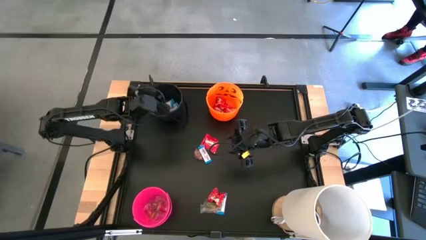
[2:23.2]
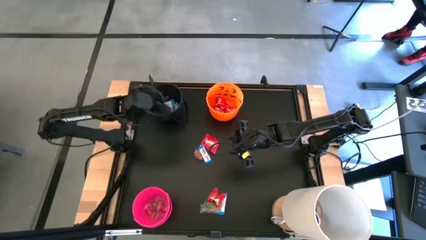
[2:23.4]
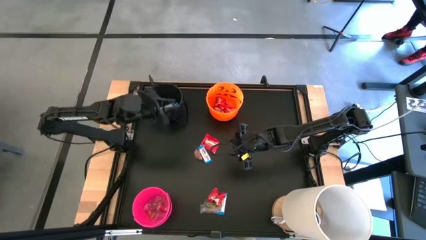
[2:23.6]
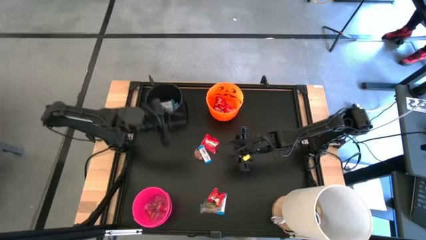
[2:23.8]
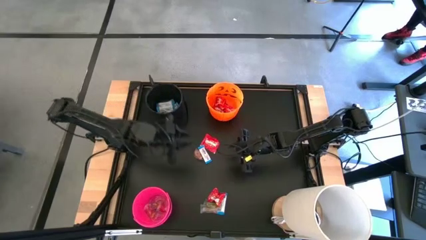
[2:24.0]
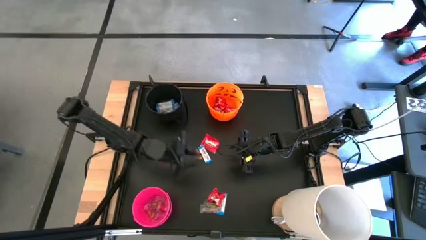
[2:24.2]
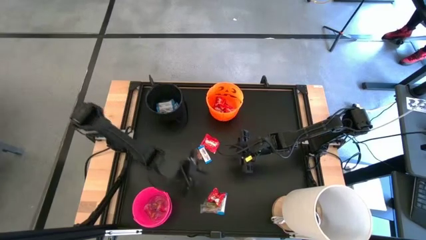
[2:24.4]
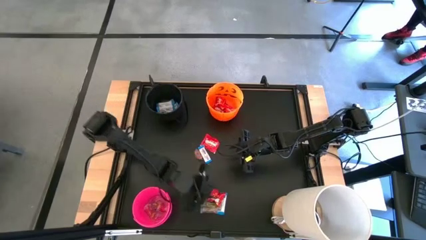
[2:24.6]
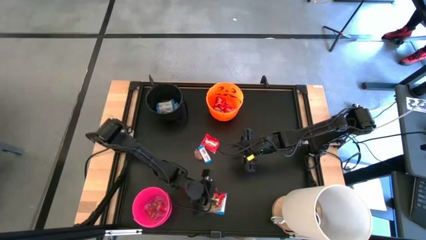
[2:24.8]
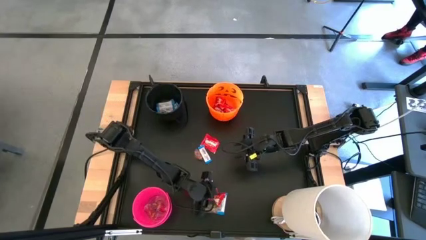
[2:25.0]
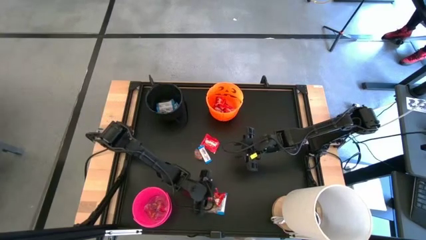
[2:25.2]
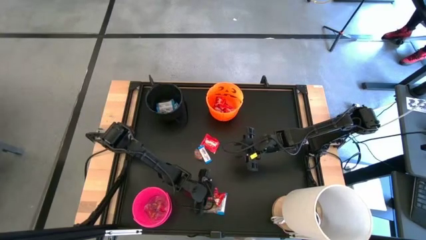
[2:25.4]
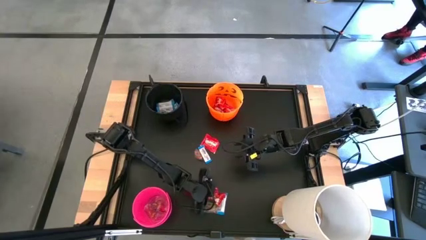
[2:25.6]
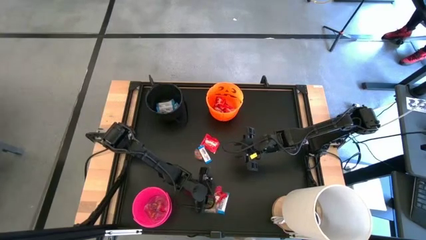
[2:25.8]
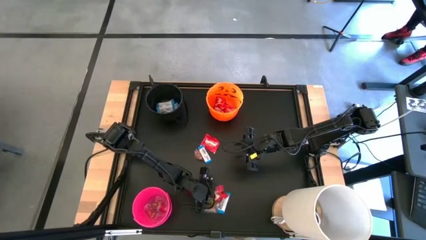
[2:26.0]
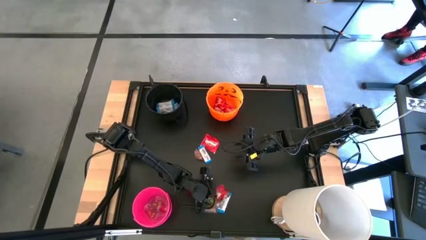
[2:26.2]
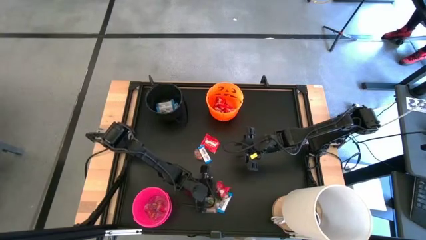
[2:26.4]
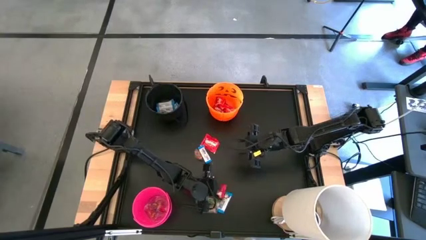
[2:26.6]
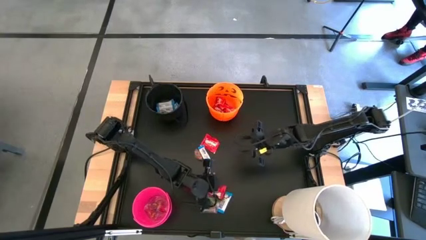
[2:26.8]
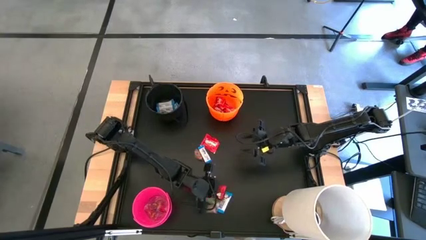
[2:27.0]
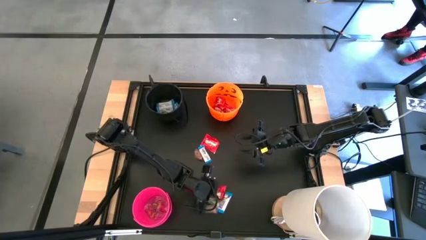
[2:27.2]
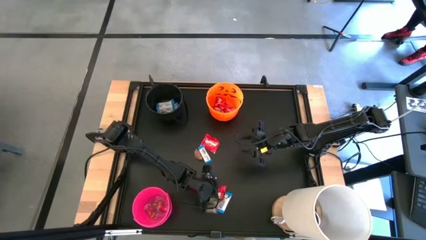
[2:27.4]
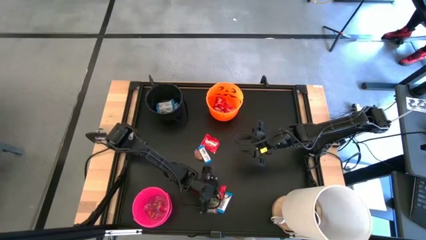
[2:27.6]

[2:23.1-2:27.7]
Task: Sort candy
Put the bottom red candy into the orange bin

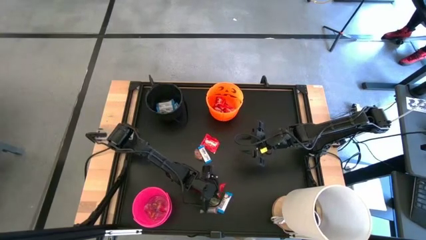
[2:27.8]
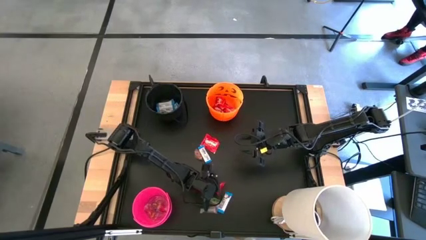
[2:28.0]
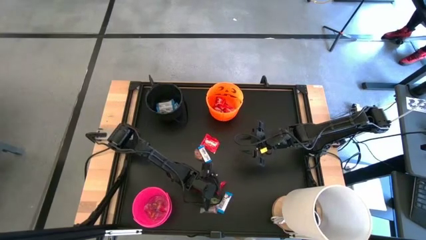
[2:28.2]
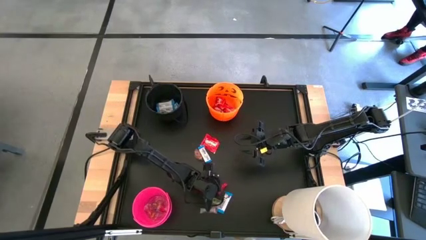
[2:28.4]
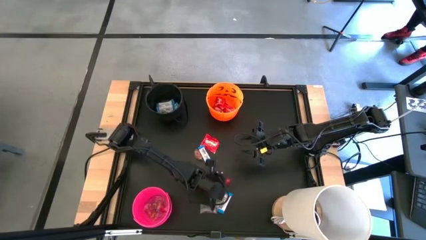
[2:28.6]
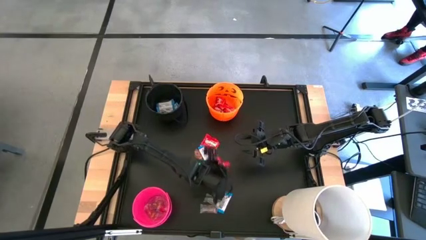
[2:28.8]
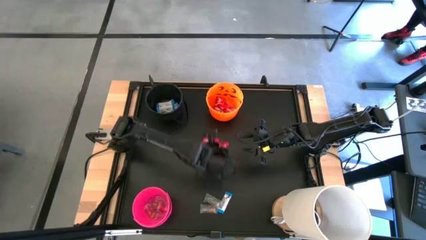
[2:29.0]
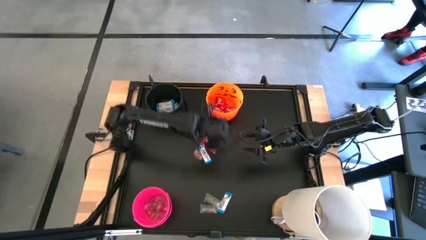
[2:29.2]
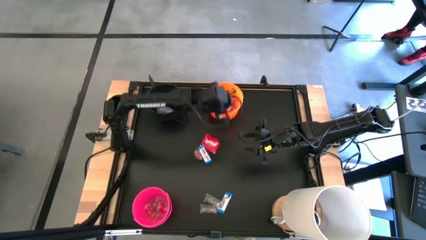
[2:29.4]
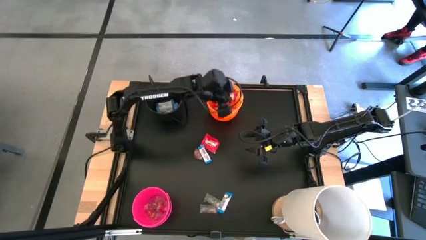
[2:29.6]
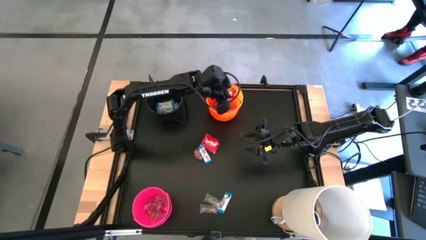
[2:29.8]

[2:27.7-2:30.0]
Put the bottom red candy into the orange bin

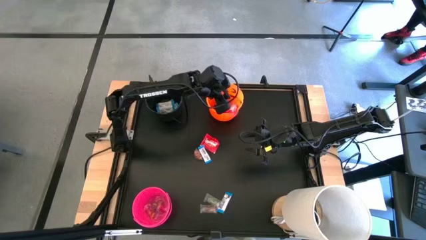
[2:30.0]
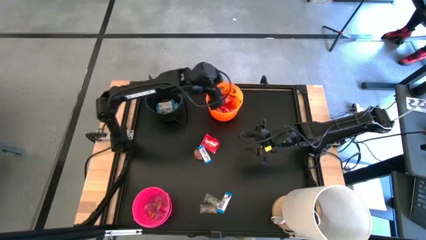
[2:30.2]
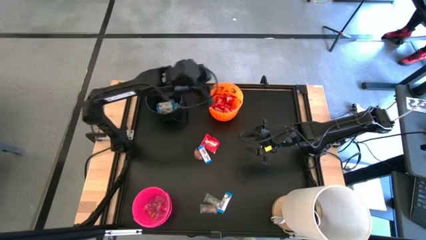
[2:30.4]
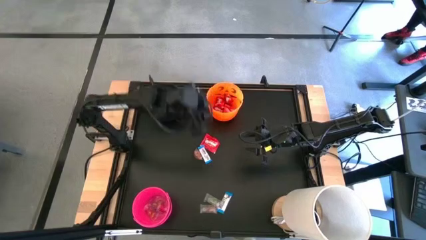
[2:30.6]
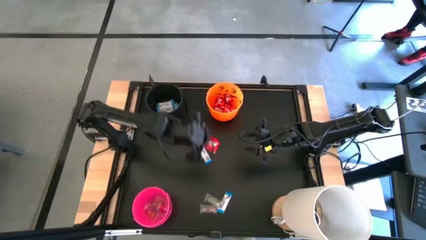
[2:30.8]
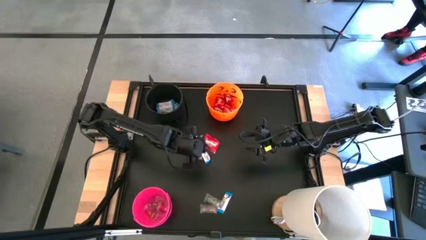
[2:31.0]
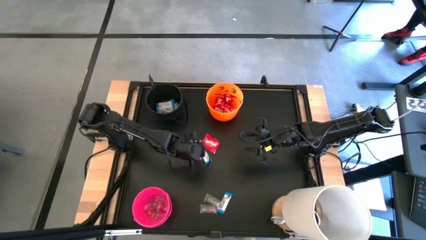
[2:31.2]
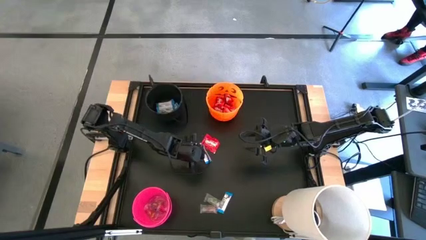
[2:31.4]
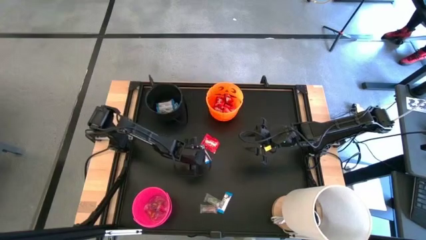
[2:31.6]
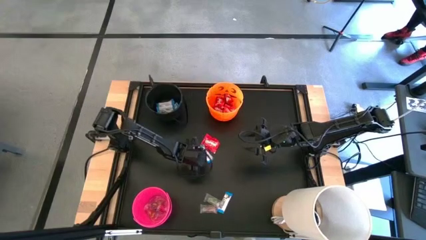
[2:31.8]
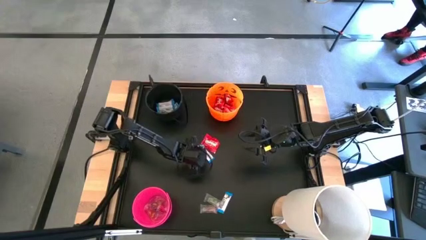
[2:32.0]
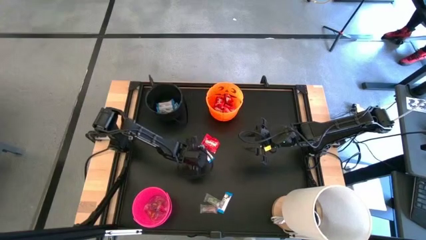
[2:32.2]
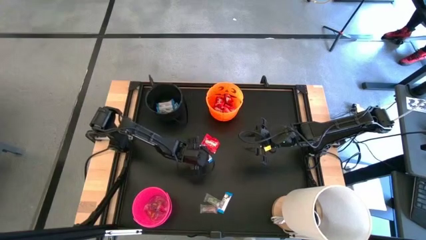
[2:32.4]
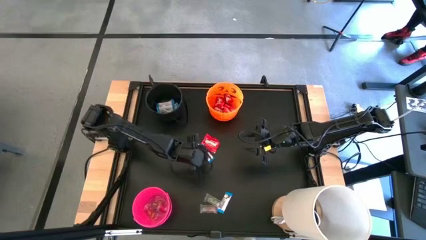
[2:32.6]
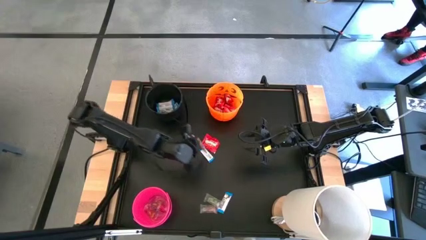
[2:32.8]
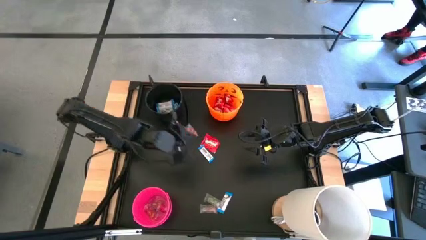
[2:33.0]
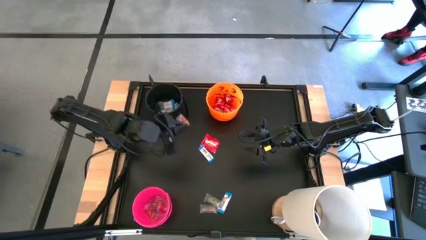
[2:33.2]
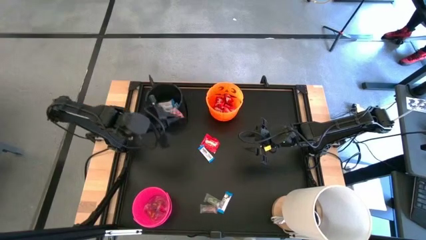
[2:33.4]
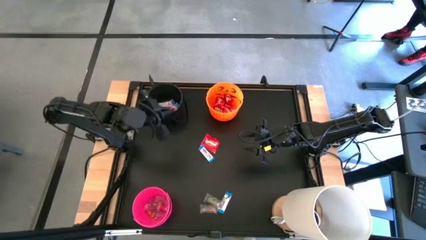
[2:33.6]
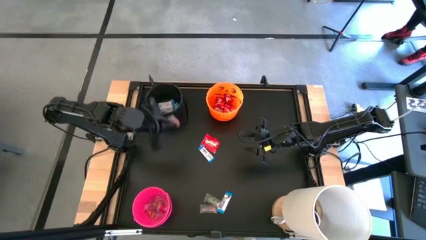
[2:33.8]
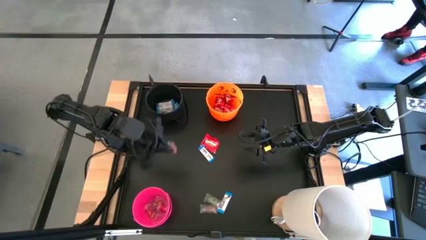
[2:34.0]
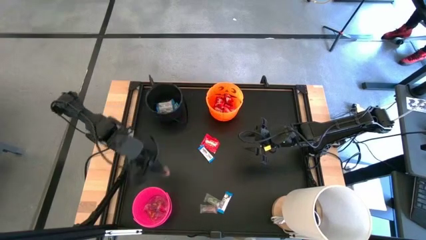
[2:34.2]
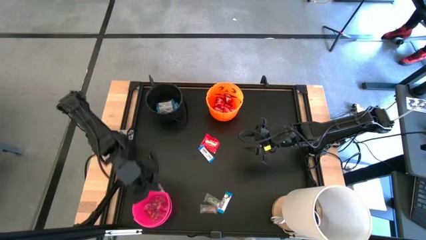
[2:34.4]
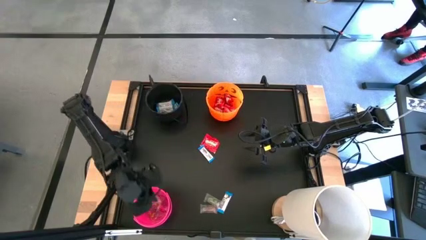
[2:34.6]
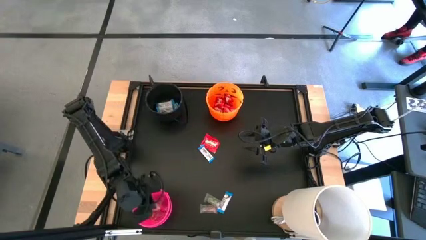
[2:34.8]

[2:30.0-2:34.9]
Put the top transparent candy into the pink bin

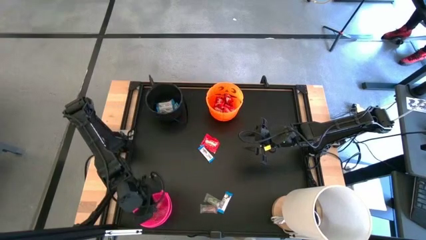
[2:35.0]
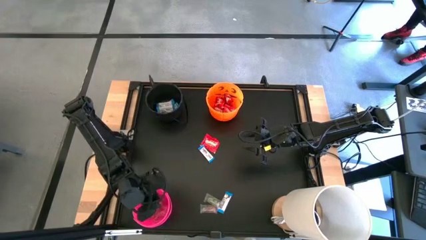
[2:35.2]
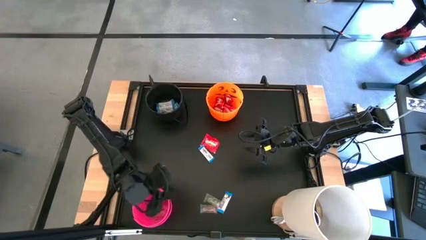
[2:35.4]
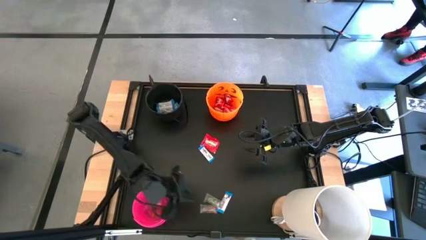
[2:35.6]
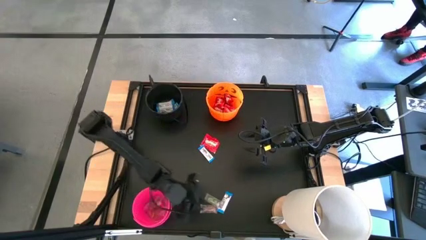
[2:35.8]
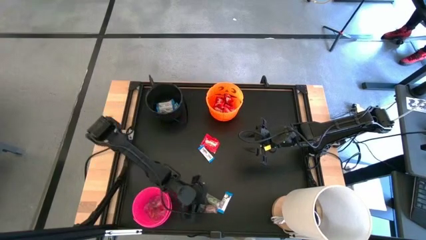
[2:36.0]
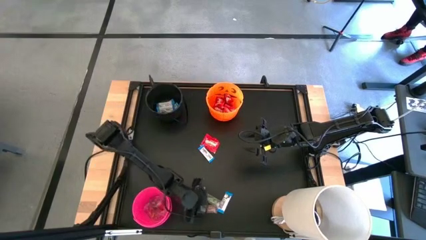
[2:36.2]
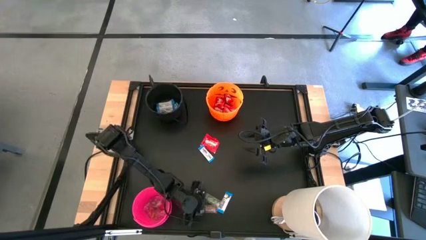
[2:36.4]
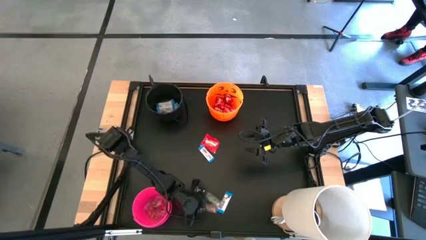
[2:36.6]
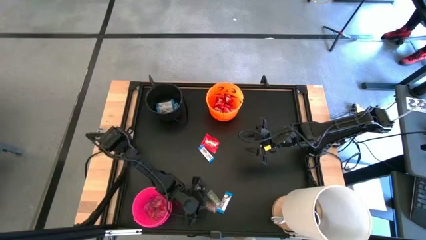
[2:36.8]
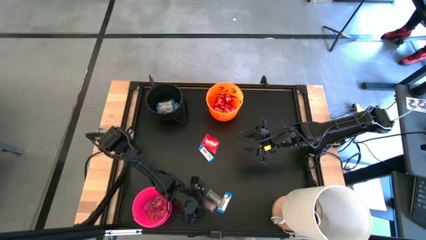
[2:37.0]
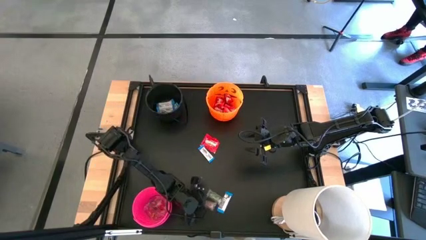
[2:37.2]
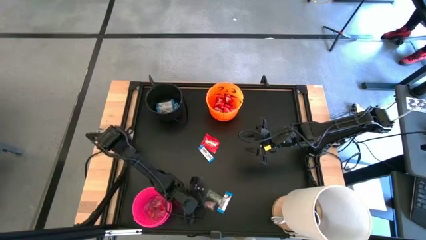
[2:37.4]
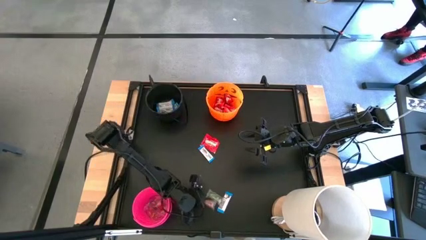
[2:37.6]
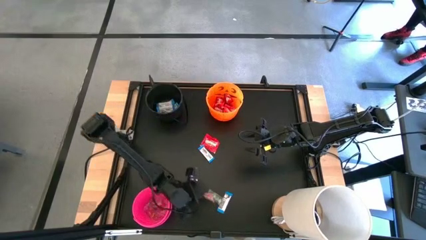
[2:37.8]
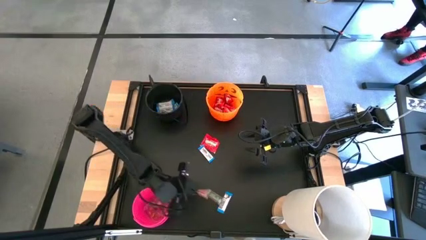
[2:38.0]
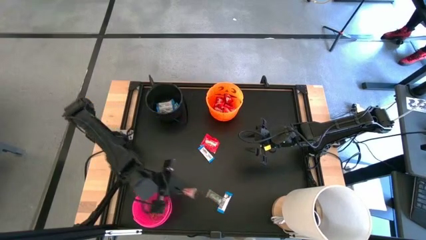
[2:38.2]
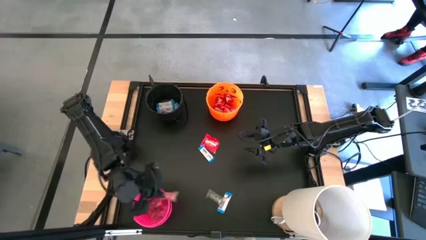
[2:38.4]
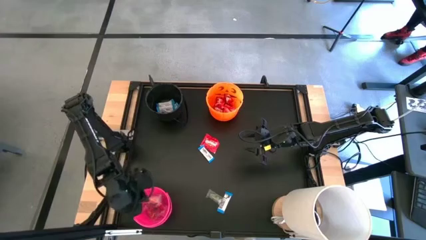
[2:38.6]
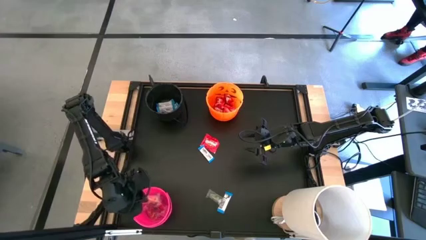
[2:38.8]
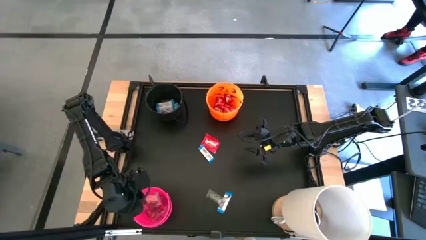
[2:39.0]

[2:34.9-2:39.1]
Put the bottom transparent candy into the pink bin

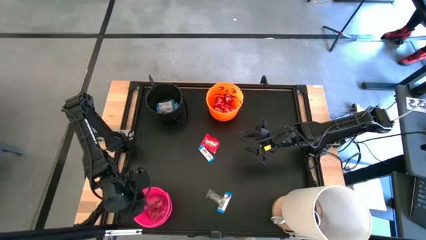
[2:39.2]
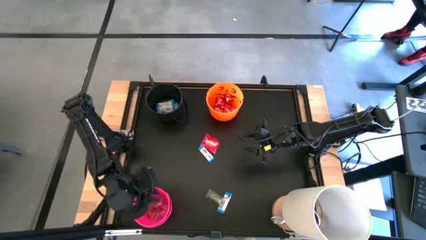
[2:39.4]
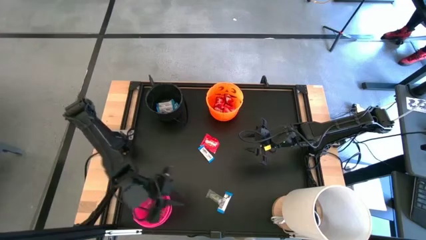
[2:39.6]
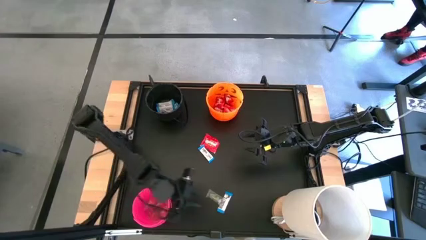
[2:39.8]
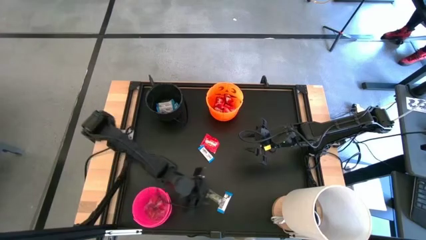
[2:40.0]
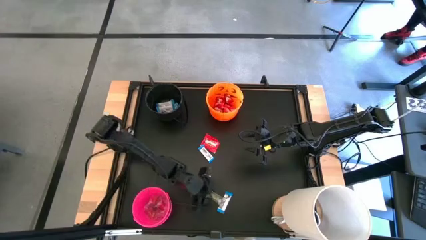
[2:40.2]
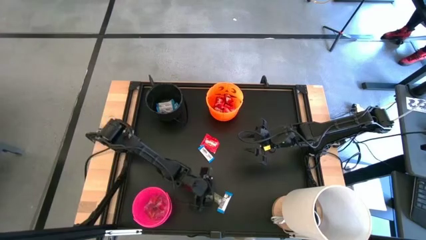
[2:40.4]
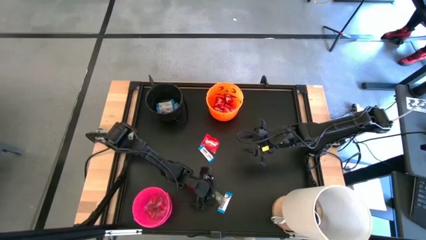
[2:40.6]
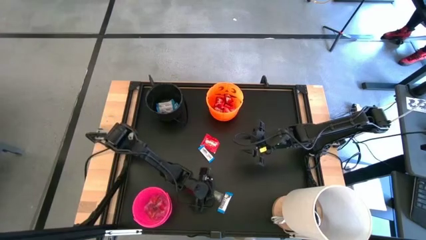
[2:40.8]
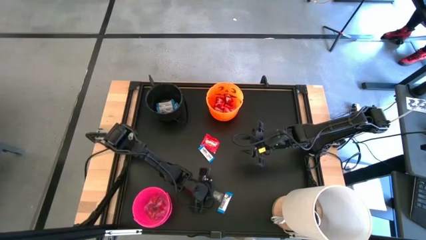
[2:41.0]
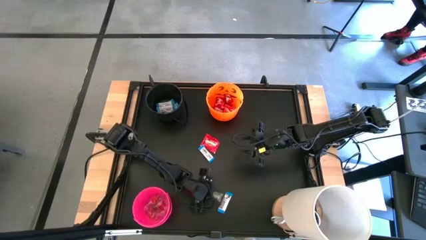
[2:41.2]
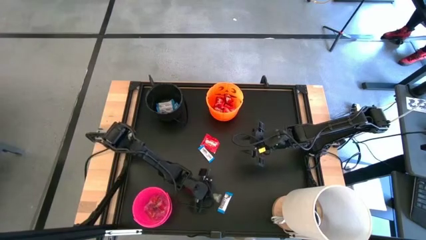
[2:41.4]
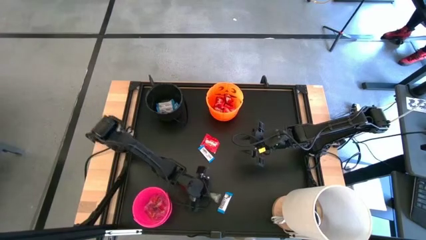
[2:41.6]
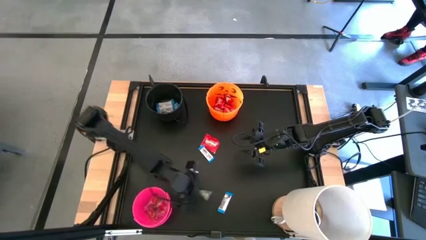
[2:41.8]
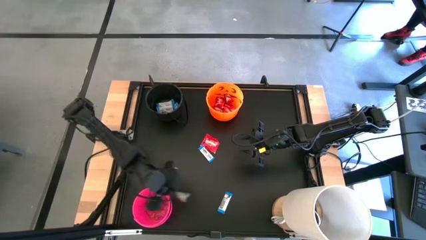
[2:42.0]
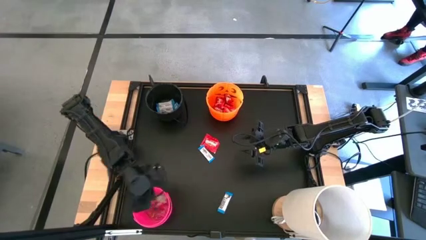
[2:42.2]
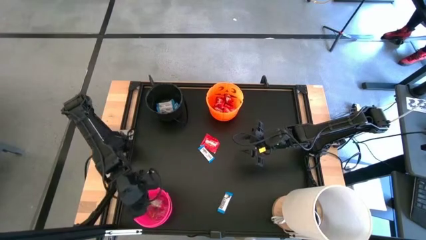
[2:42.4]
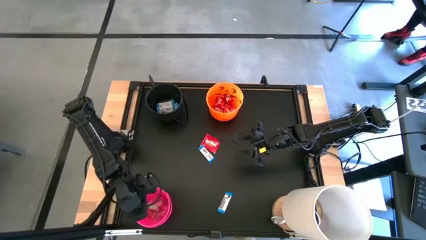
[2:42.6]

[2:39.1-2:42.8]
Put the transparent candy into the pink bin
